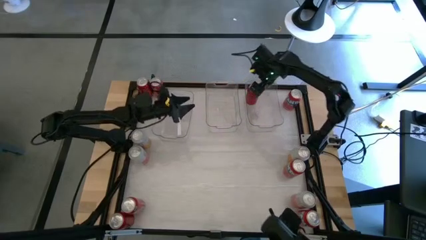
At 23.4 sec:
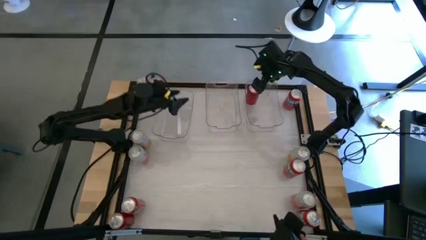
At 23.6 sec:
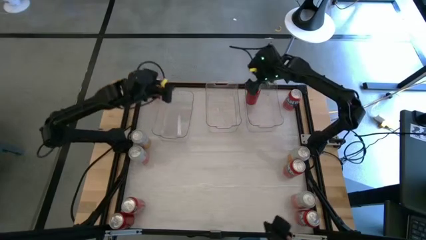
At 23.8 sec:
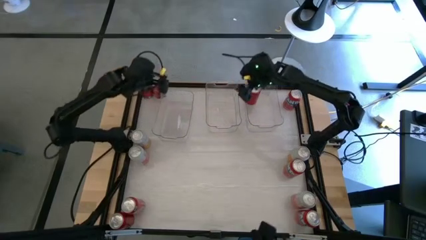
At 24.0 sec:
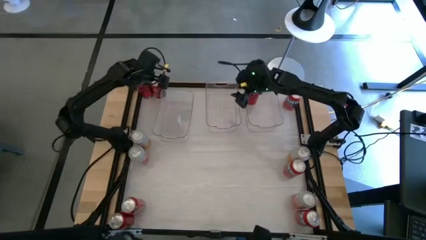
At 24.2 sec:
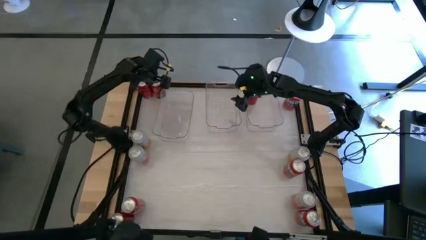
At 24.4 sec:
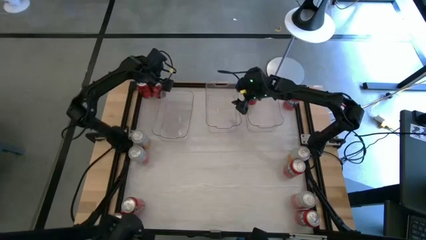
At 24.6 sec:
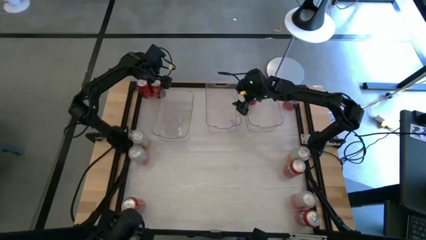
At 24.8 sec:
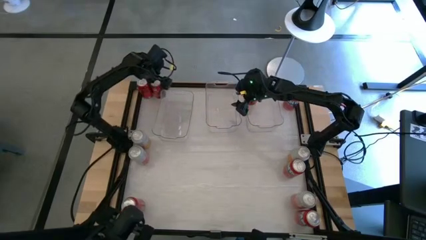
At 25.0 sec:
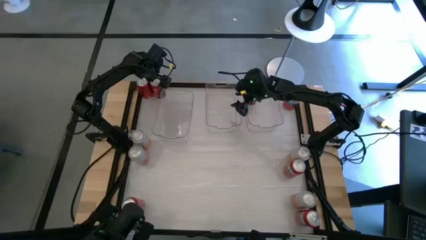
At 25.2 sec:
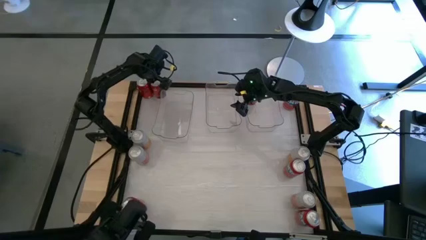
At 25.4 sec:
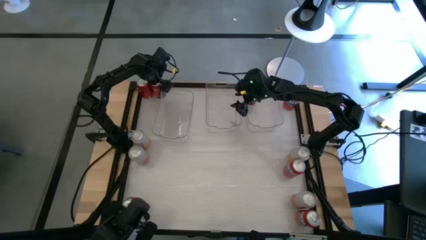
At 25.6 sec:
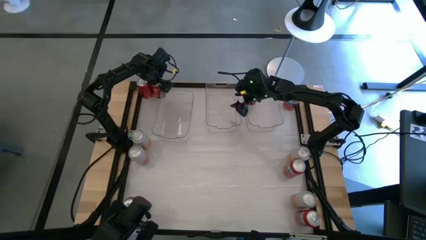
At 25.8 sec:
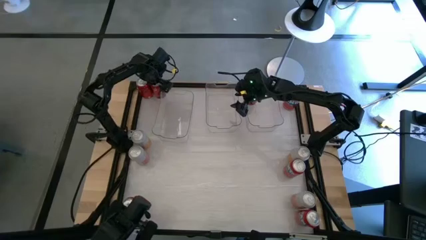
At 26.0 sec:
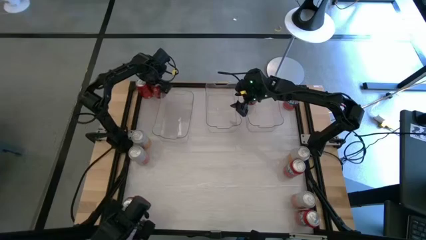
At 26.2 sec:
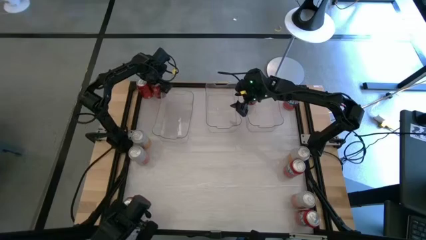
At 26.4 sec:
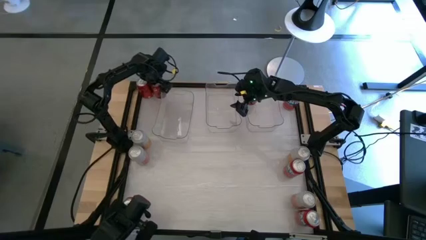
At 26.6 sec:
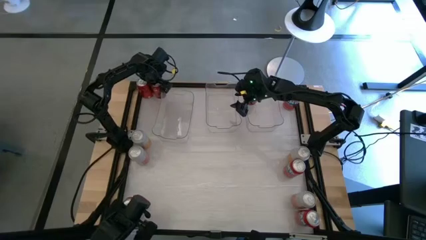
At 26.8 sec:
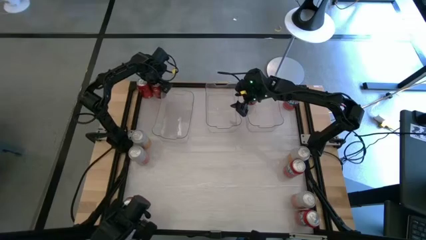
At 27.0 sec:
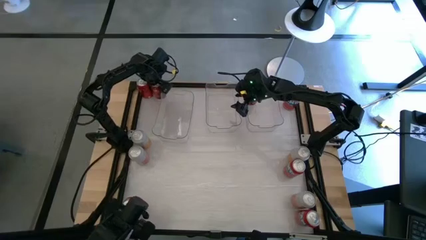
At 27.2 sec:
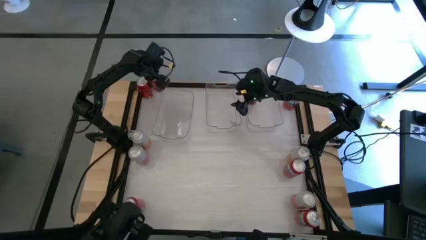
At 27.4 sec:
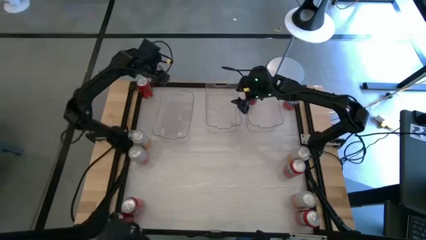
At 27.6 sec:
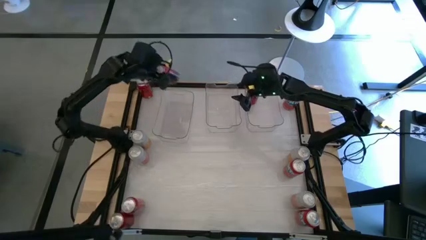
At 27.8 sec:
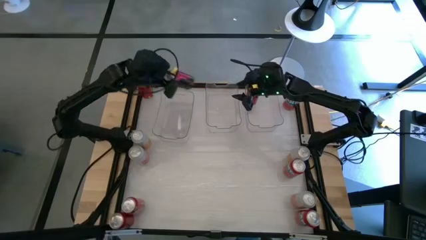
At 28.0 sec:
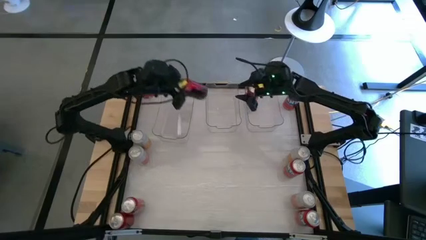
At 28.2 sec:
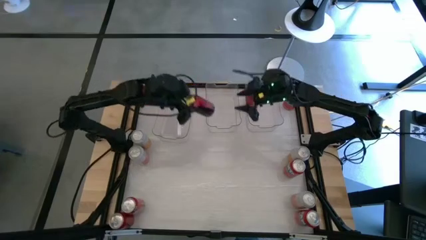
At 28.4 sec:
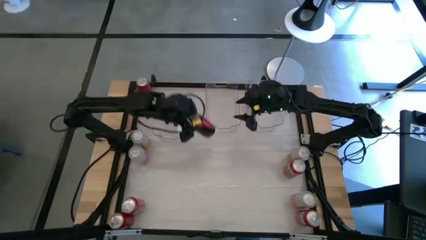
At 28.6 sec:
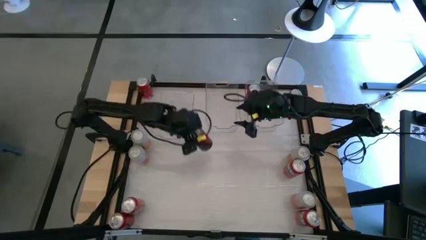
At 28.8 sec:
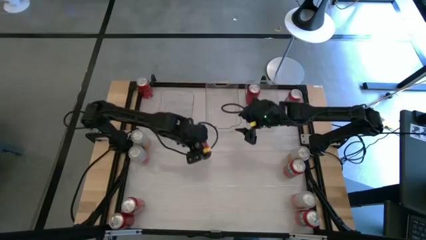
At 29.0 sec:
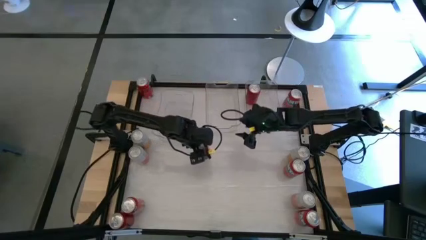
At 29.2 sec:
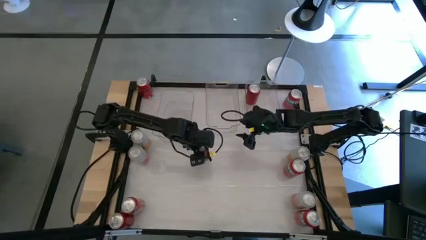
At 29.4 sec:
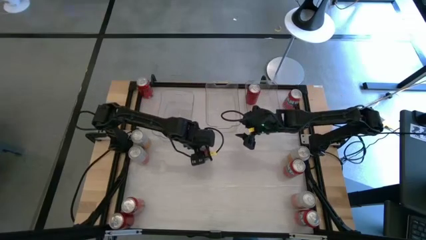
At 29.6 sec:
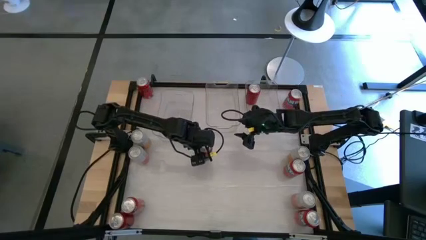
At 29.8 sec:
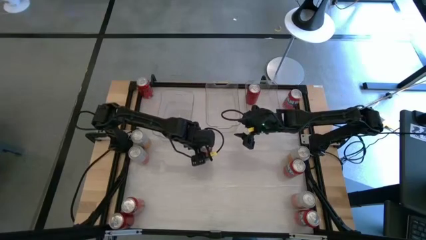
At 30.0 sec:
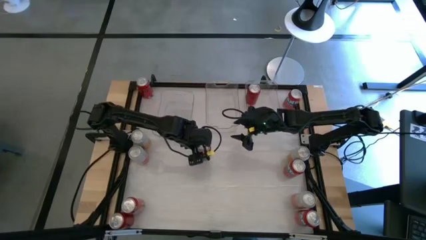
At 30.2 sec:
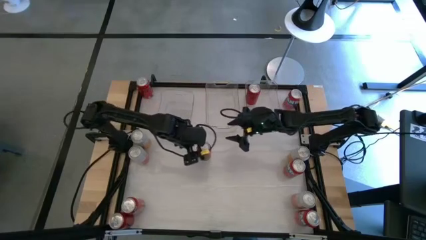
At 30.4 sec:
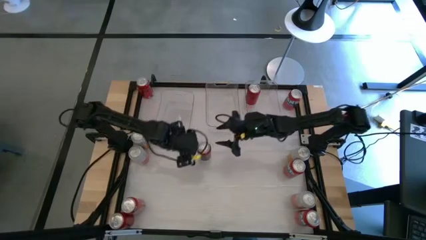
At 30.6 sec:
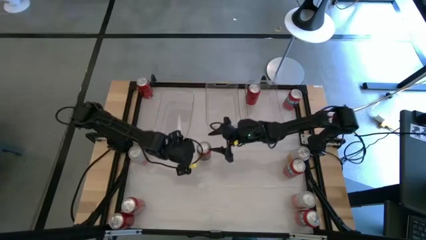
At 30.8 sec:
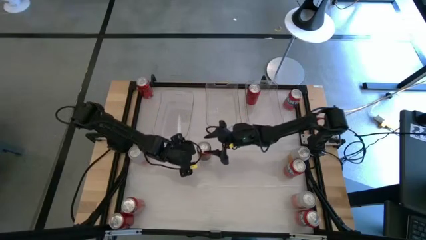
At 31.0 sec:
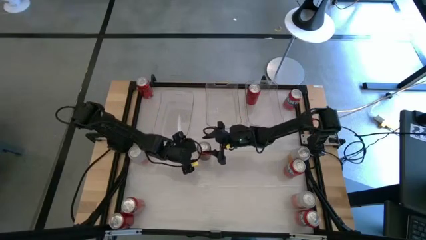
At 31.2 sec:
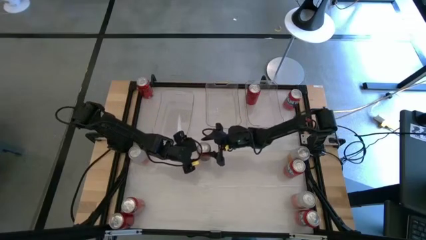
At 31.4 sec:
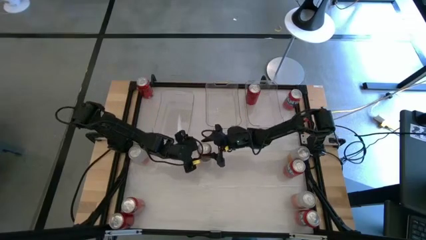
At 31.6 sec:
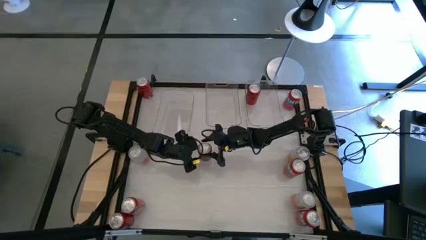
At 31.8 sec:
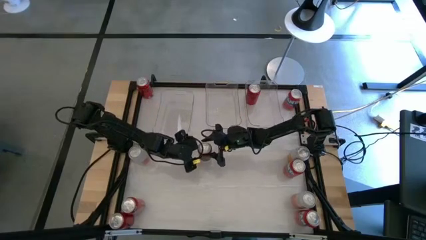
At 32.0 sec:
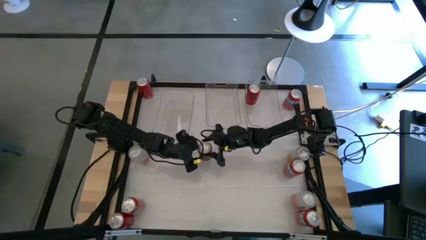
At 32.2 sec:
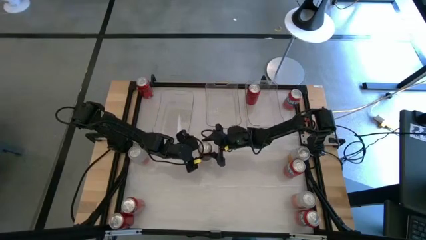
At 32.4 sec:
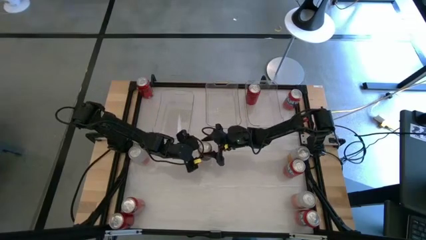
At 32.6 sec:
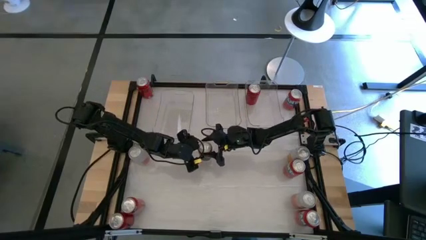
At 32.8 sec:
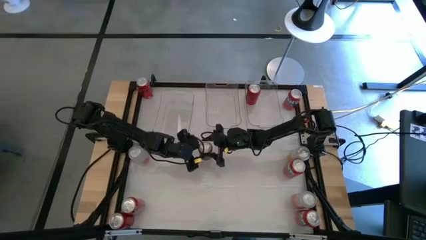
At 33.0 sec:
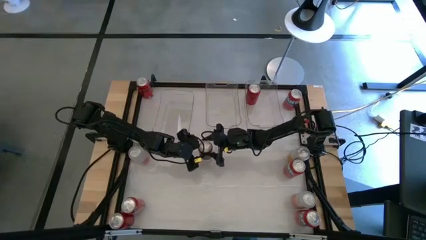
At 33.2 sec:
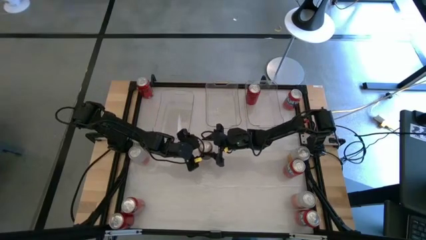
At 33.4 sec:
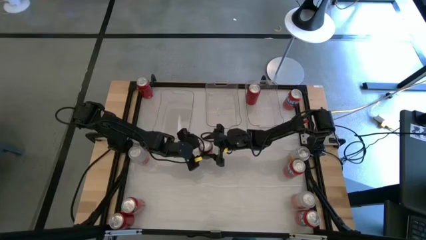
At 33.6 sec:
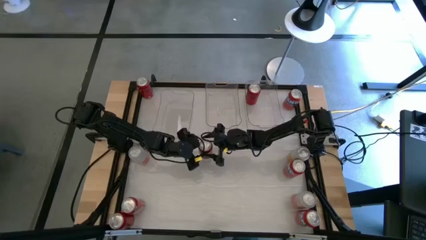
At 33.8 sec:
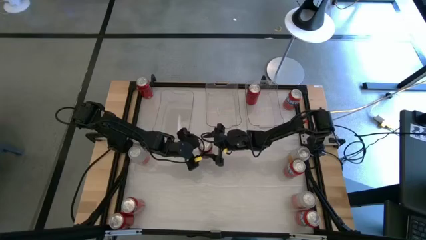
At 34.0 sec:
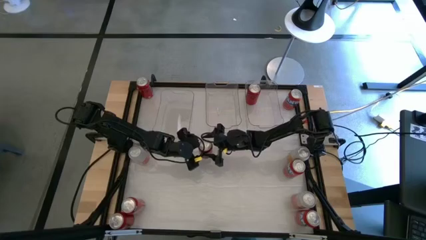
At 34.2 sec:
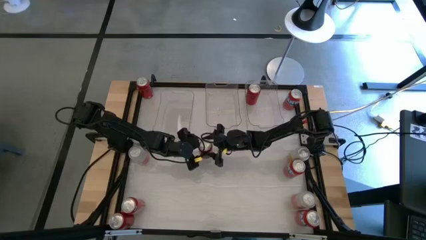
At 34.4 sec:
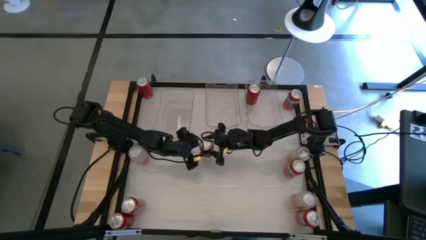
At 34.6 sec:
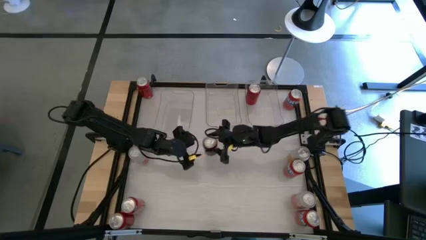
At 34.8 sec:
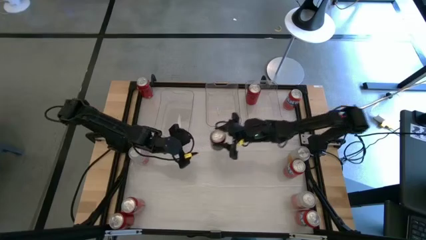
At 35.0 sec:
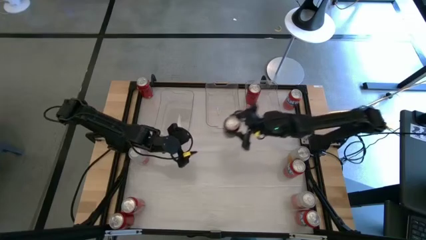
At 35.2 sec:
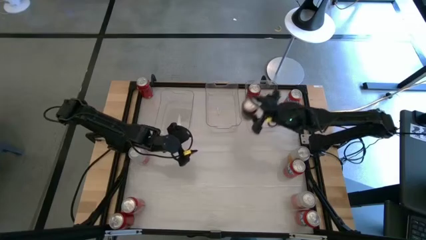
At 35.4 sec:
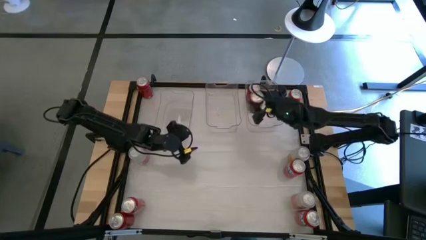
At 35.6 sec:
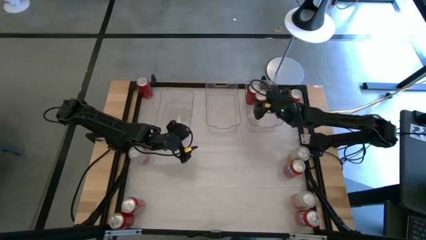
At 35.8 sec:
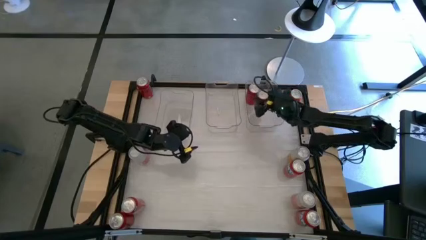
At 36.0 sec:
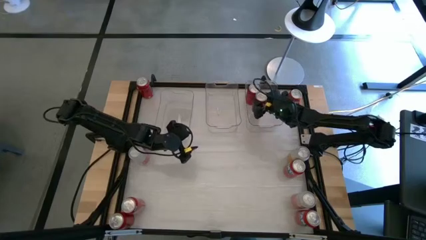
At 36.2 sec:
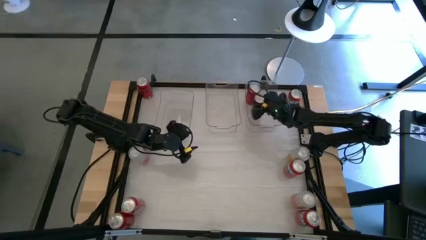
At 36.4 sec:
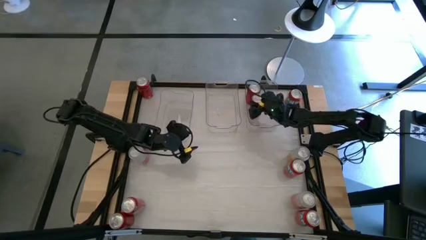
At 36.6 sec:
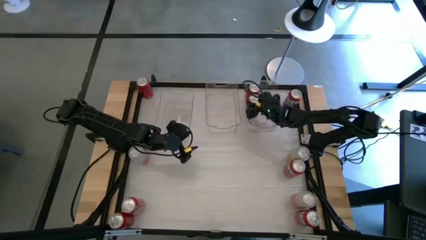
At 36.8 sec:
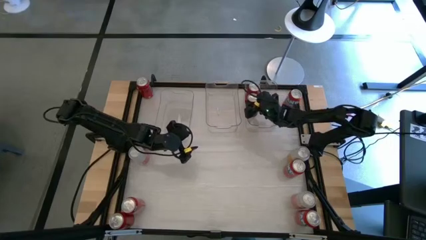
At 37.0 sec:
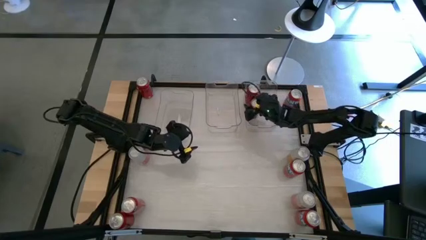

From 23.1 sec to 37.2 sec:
Task: Sort soda cans
Put the top middle red black soda can into the right transparent bin

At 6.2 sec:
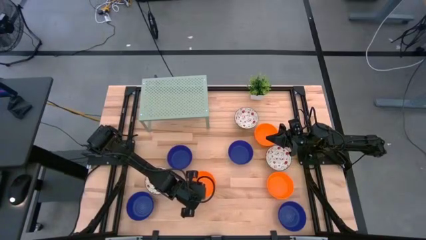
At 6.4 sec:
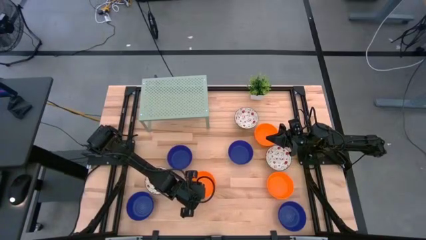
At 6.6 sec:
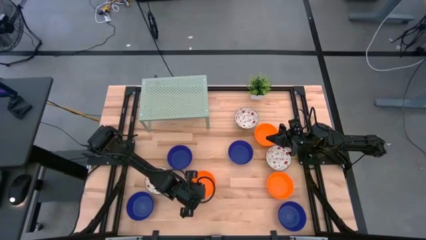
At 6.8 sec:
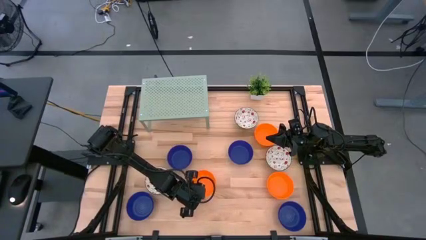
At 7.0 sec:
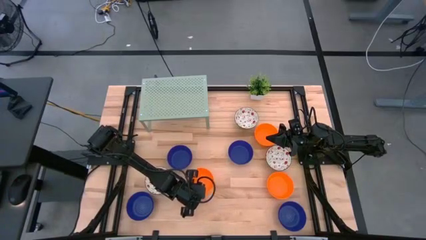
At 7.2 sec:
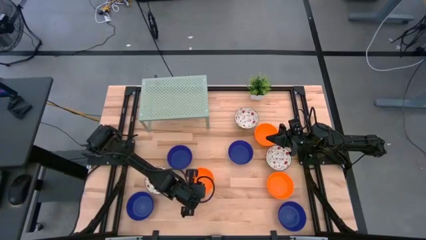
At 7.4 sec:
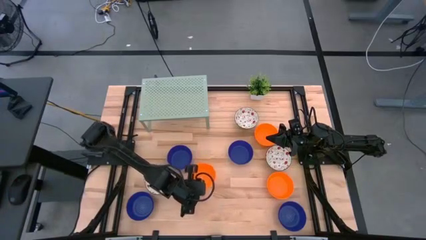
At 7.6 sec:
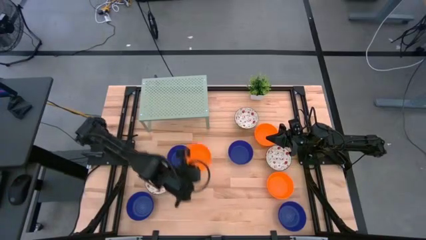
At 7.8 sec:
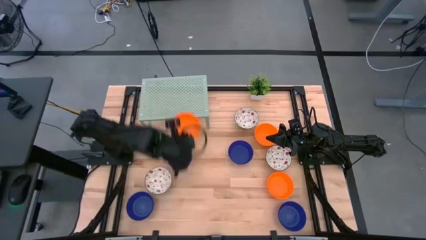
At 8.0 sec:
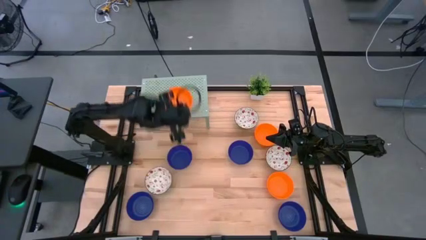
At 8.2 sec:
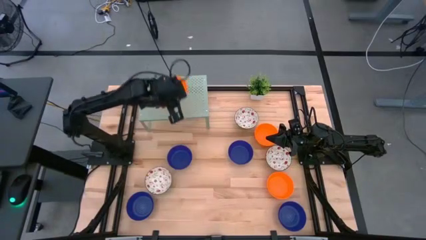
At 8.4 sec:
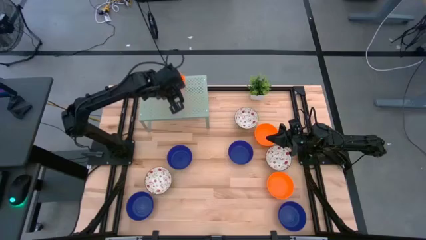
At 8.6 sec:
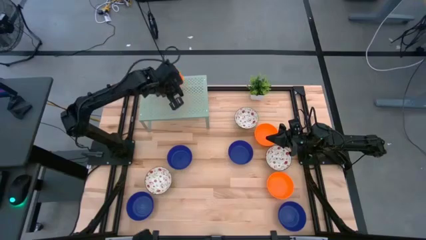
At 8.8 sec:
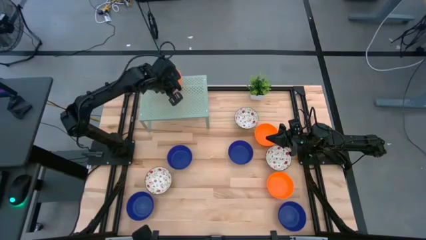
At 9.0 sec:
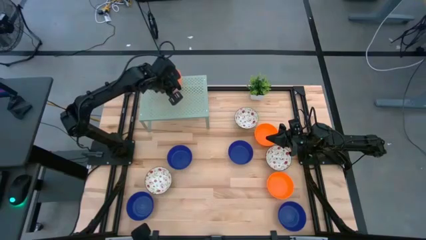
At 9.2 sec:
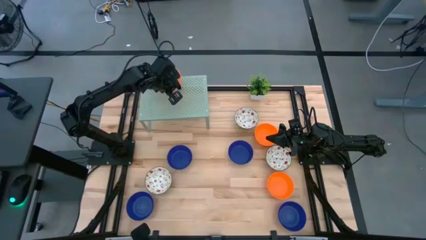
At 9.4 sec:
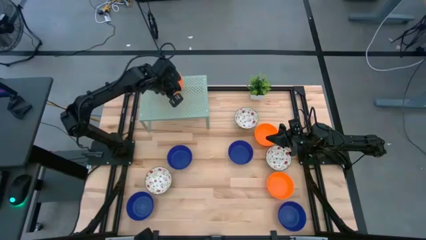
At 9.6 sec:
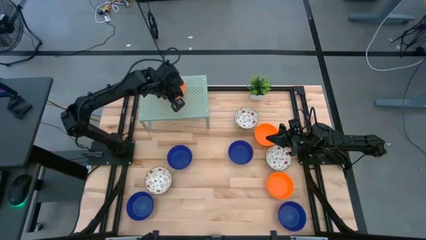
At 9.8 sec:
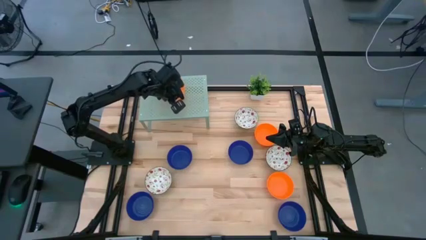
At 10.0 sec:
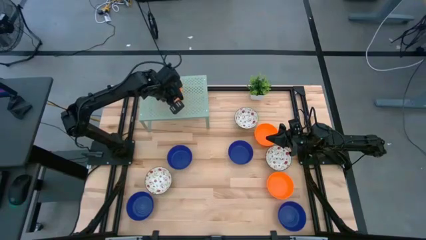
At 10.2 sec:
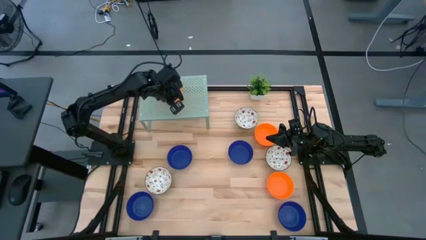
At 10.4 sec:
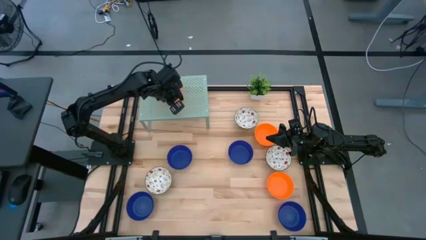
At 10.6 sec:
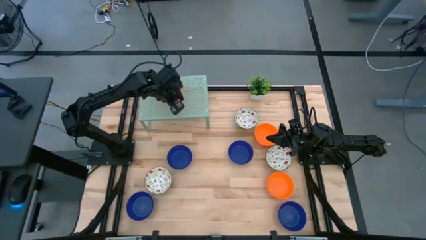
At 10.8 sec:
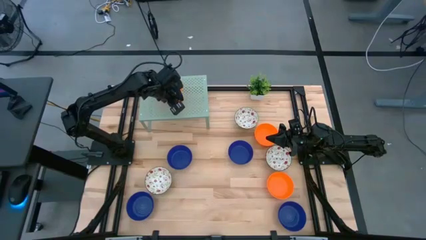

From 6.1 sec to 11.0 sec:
Task: Pick & Place Mini bowls
Put the orange bowl on the shelf
